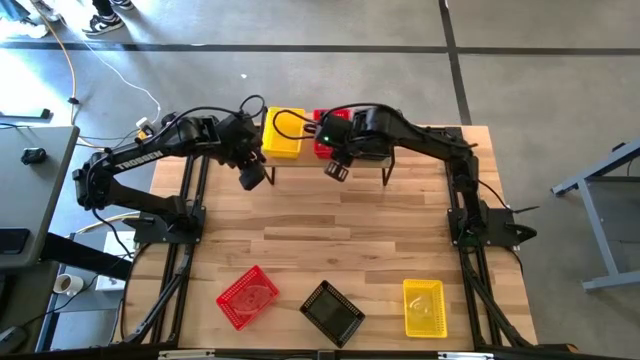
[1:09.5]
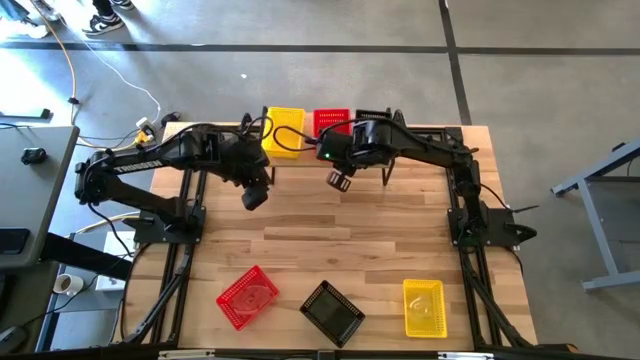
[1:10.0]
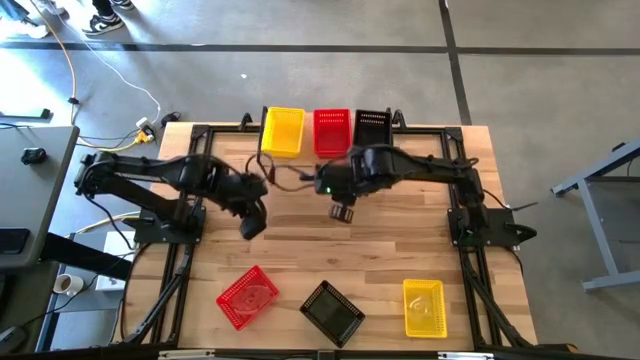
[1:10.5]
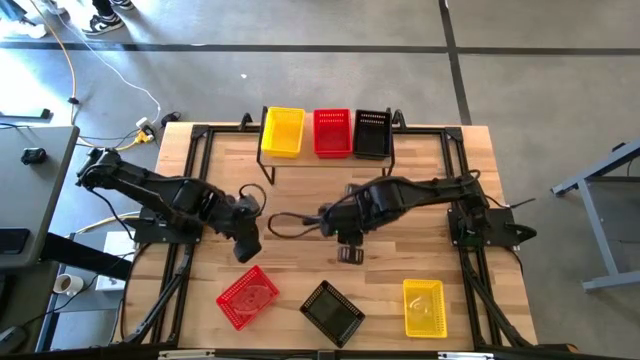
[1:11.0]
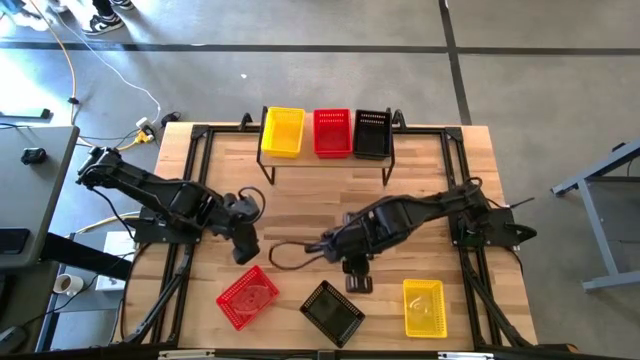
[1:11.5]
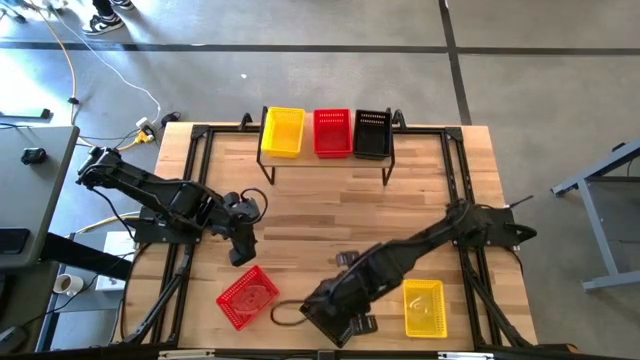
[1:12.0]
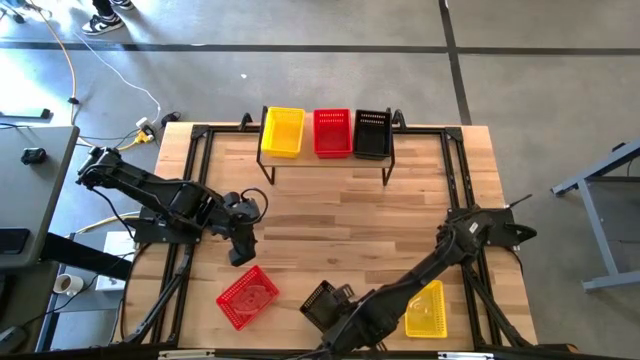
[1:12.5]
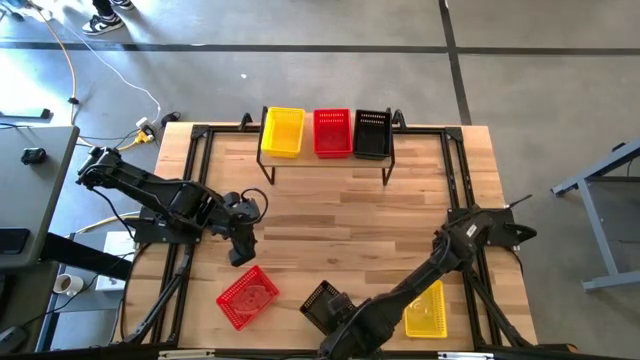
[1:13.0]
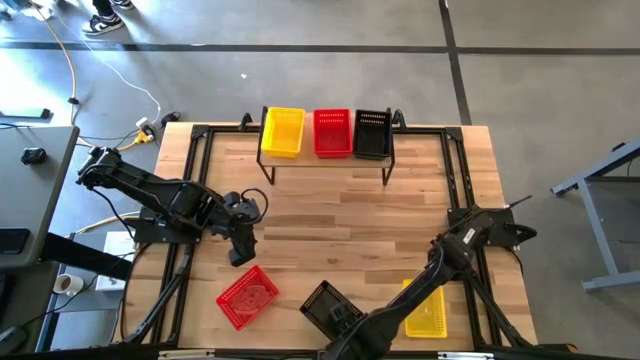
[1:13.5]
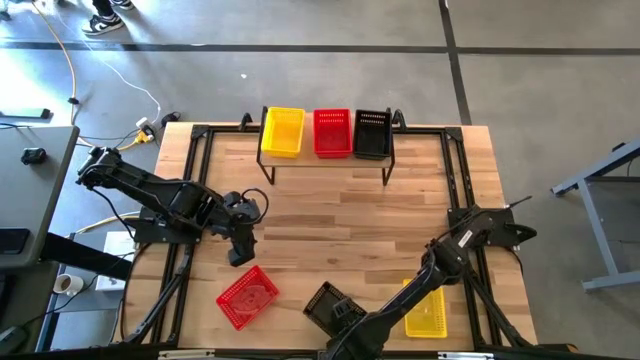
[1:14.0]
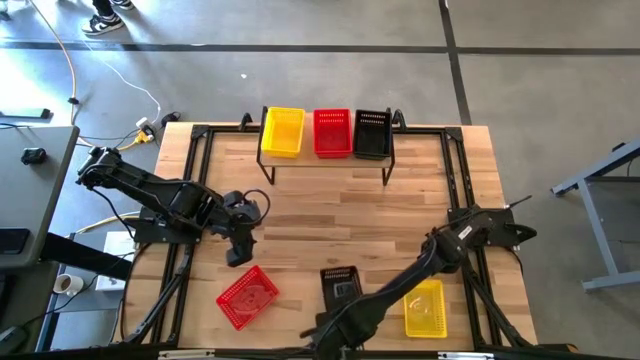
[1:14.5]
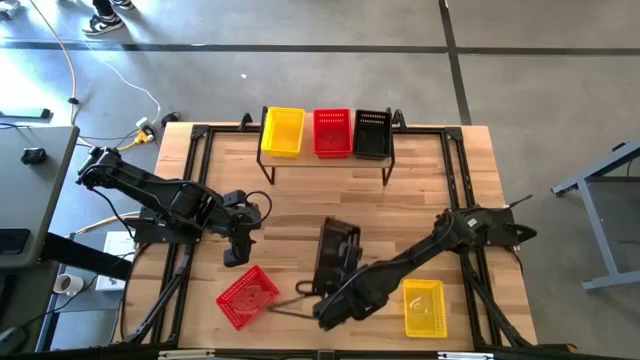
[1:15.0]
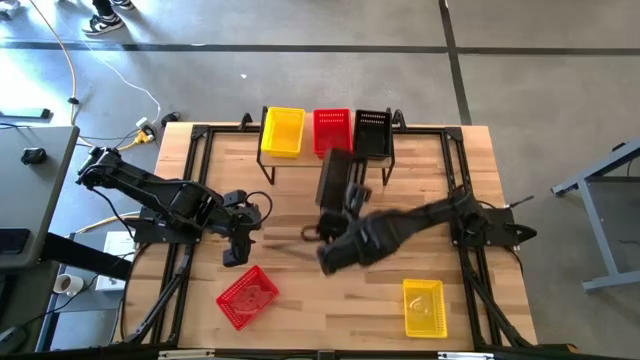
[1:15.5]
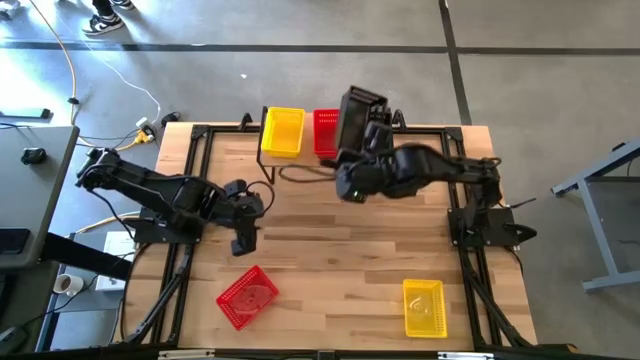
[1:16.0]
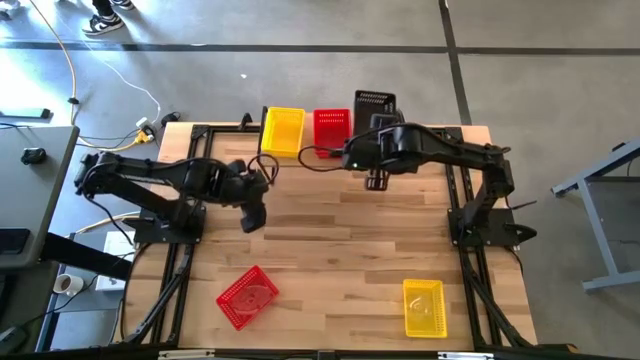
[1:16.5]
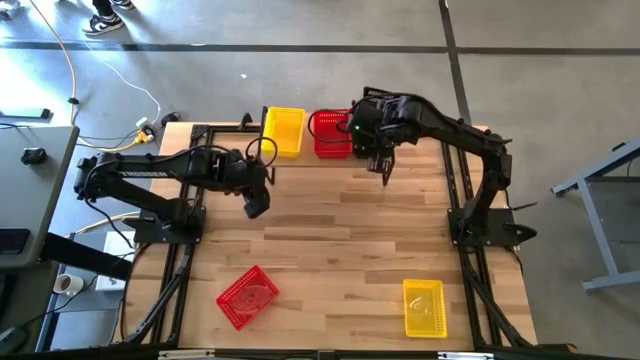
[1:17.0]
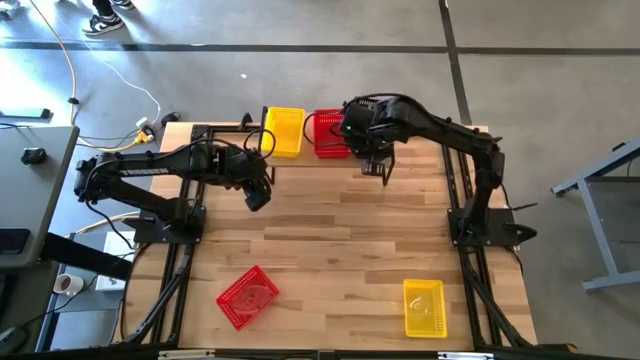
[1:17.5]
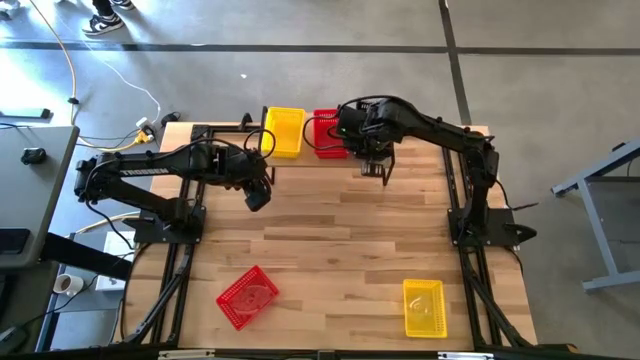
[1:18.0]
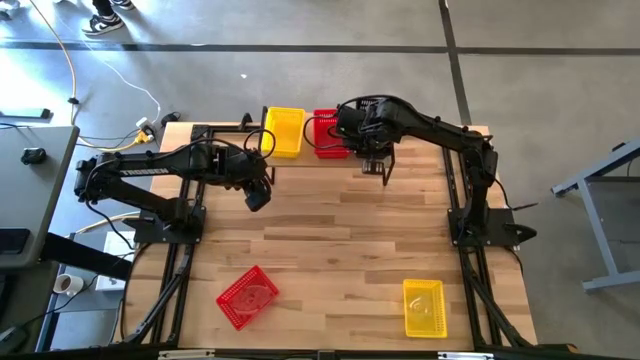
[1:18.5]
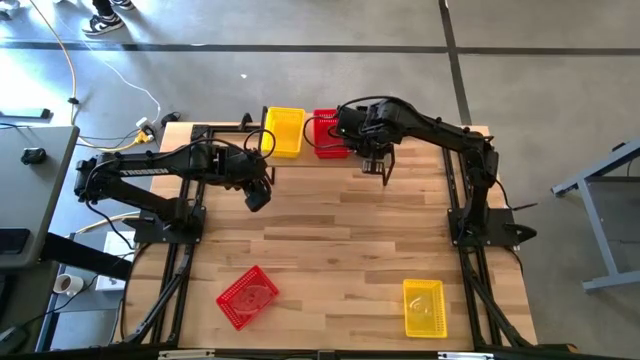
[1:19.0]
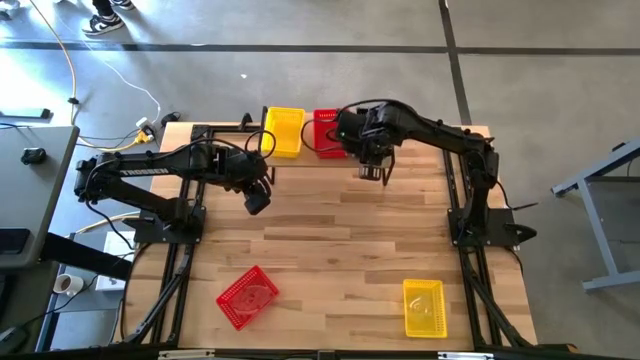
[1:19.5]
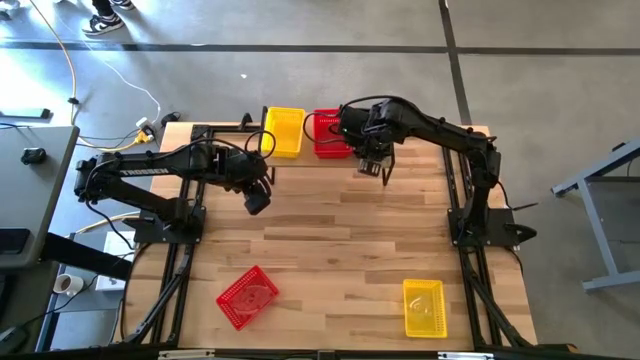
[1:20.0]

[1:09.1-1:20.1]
Task: Stack baskets on shelf by color
Stack the black bin on the stacked black bins on the shelf

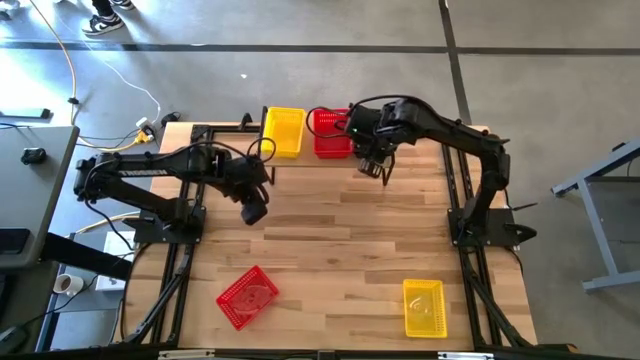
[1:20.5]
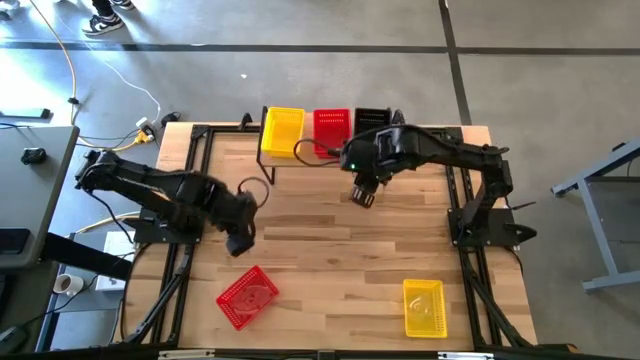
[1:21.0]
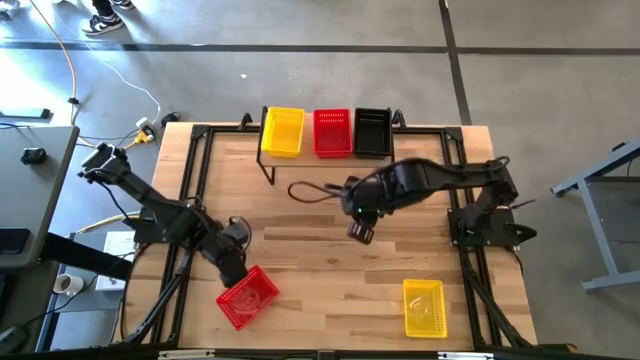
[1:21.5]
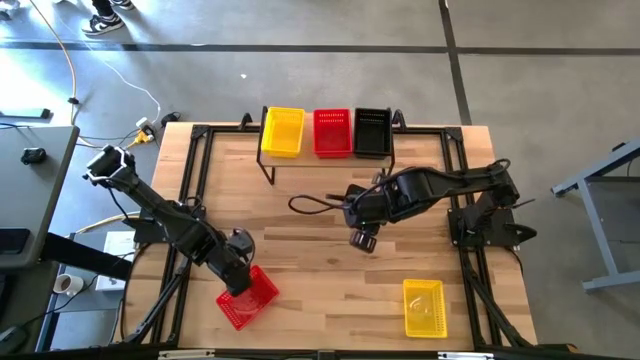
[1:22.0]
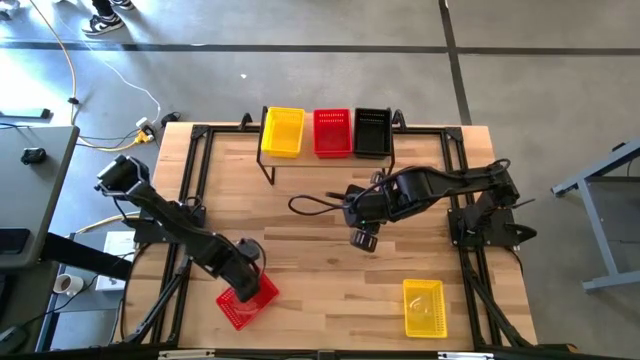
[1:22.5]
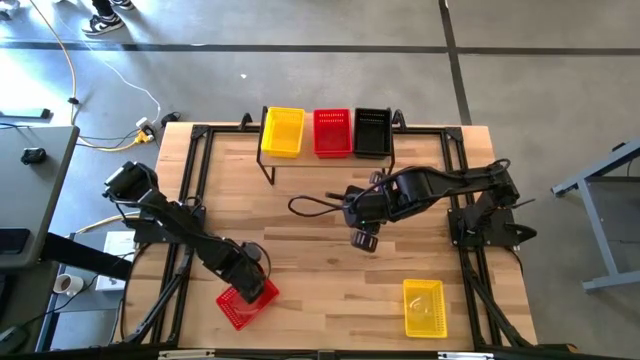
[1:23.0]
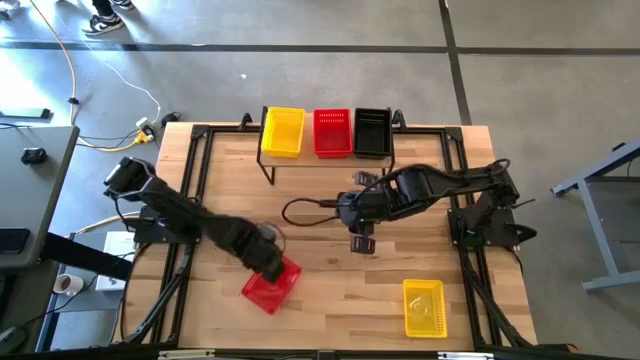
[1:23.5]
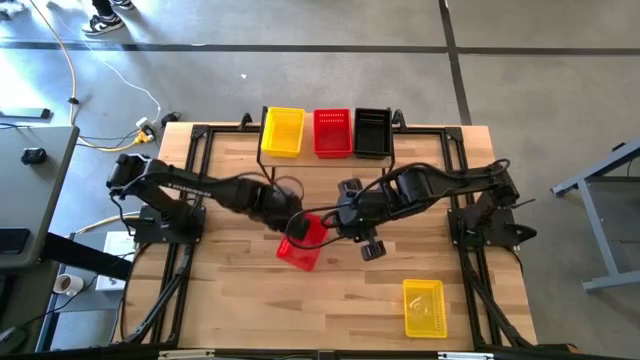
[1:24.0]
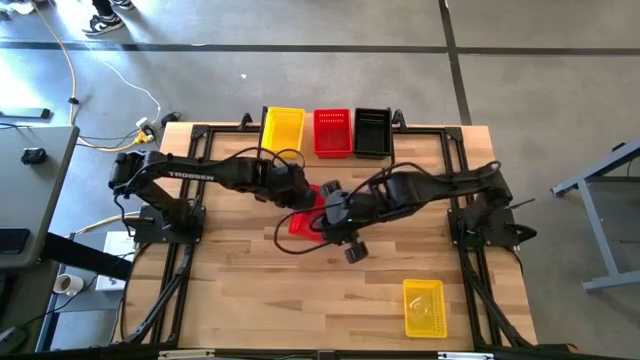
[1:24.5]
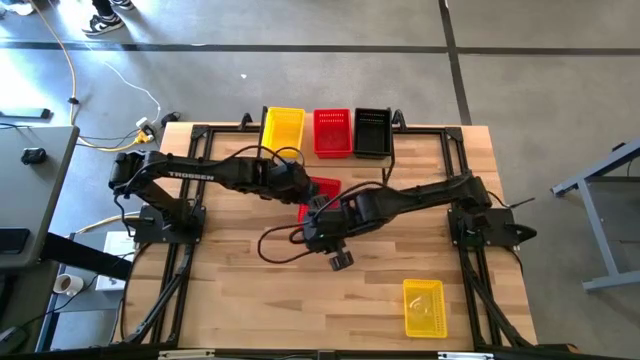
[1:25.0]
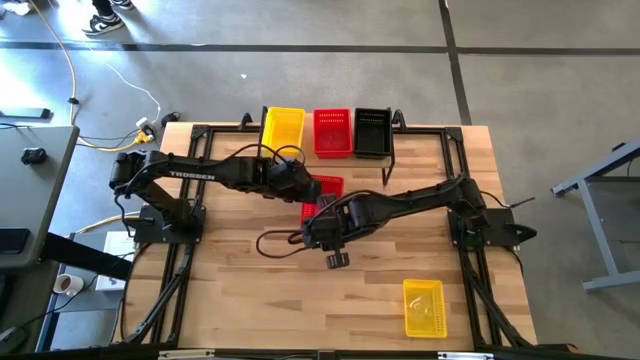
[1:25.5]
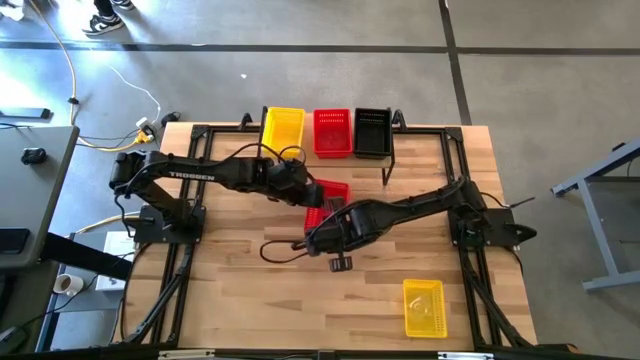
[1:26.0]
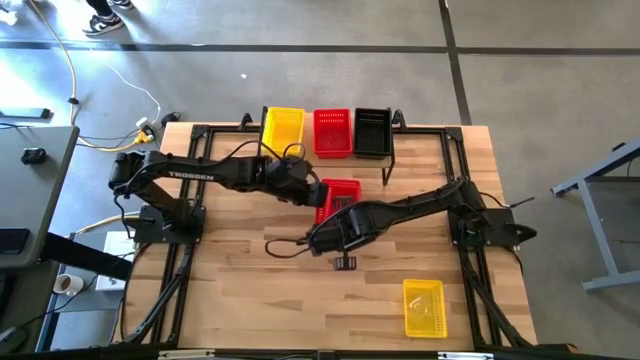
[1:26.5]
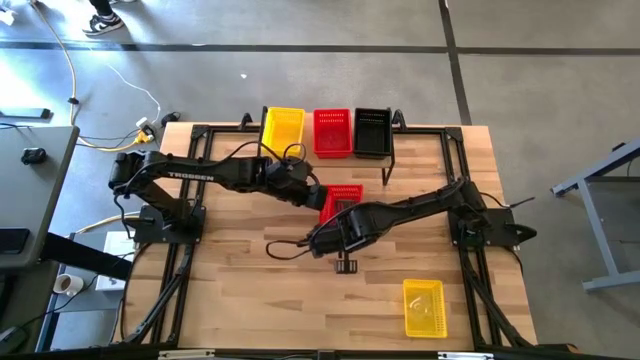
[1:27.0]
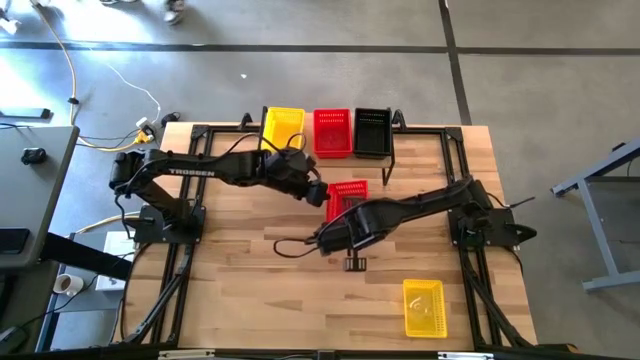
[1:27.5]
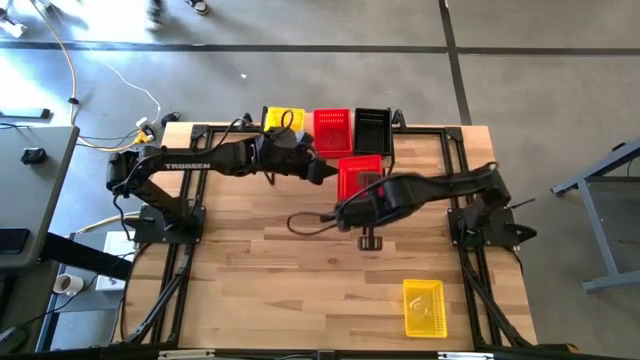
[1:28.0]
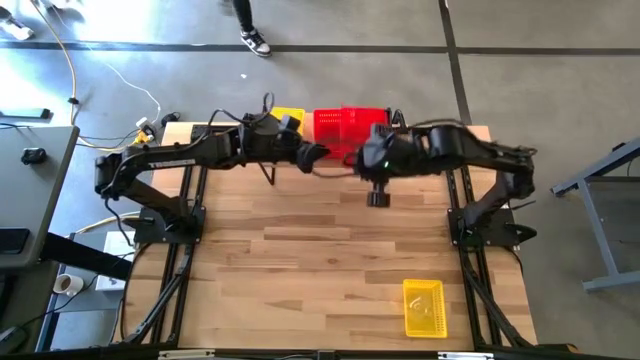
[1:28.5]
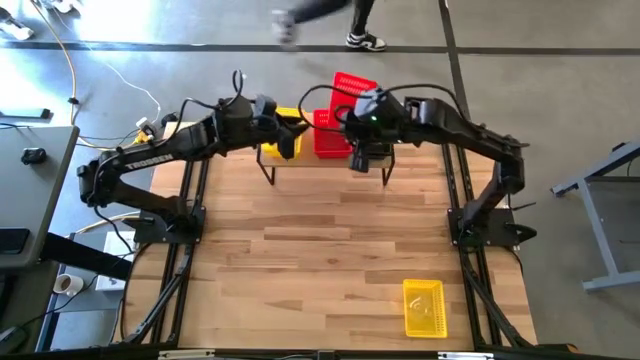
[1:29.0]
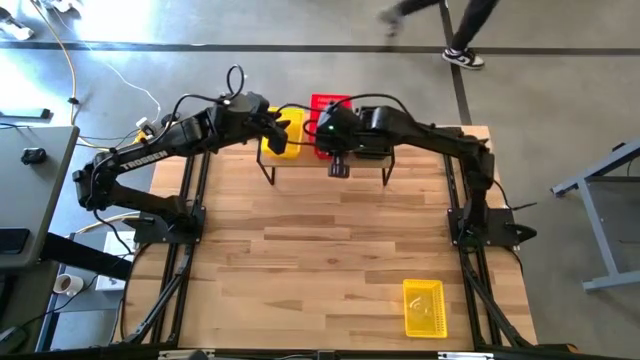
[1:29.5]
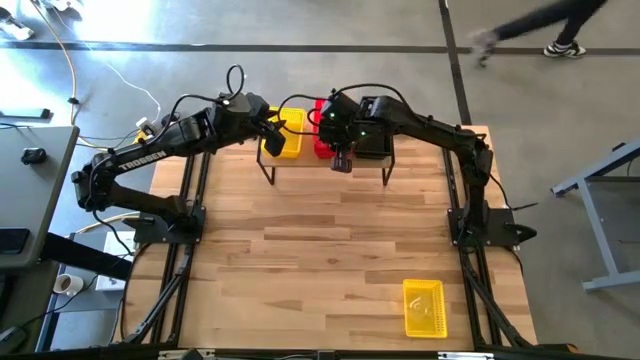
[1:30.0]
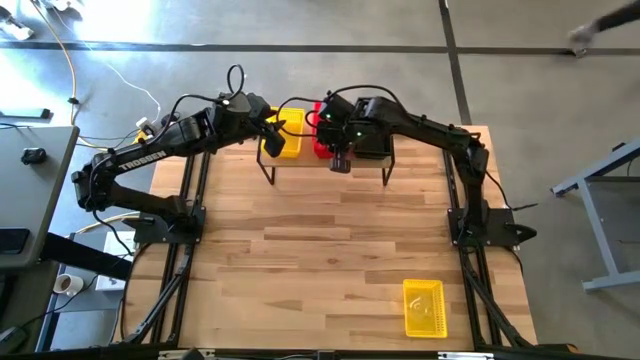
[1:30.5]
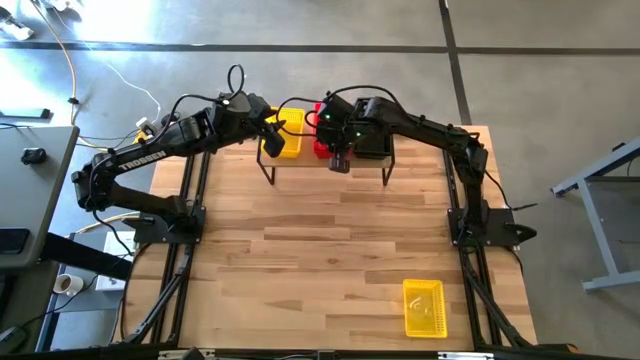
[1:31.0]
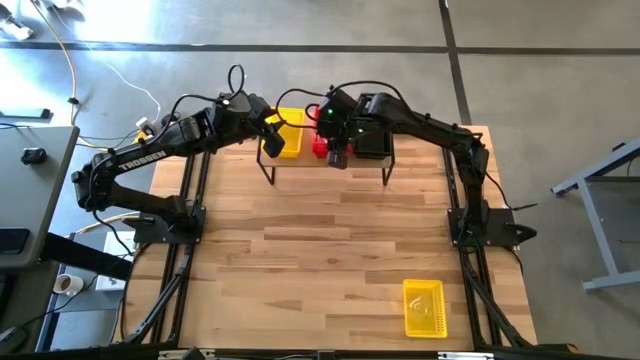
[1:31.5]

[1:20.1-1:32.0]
Stack the red bin on the stacked red bin on the shelf
